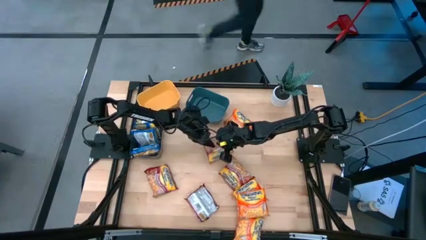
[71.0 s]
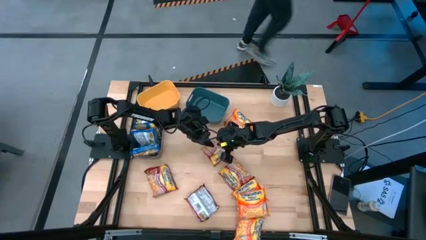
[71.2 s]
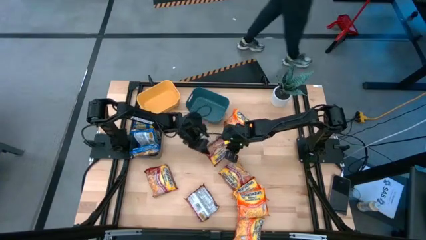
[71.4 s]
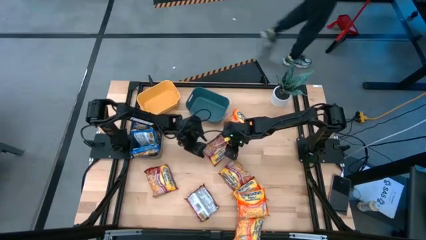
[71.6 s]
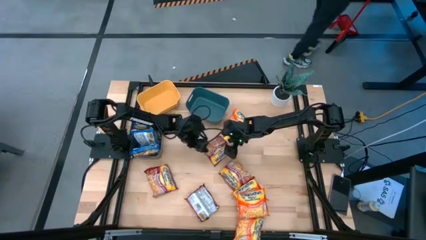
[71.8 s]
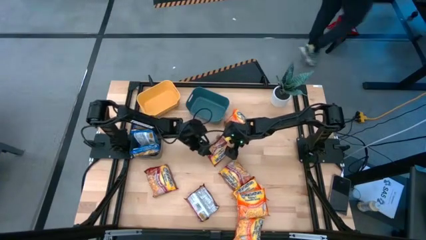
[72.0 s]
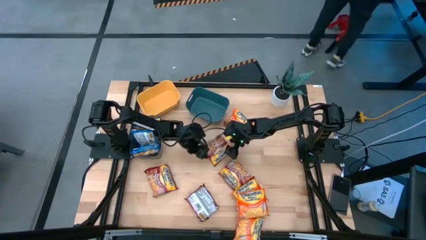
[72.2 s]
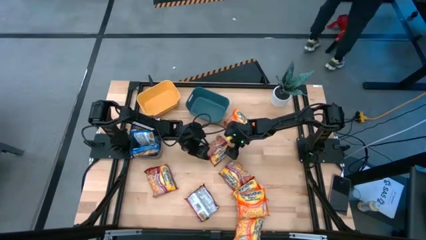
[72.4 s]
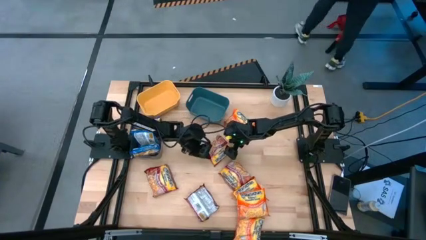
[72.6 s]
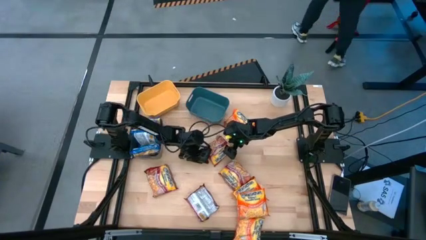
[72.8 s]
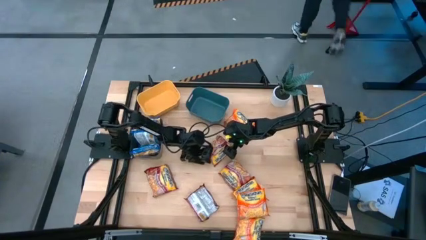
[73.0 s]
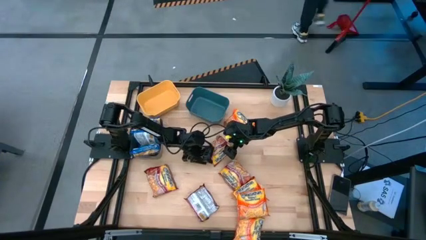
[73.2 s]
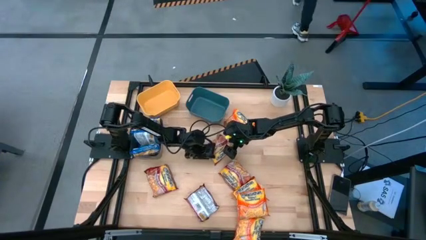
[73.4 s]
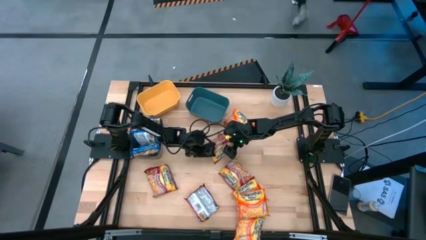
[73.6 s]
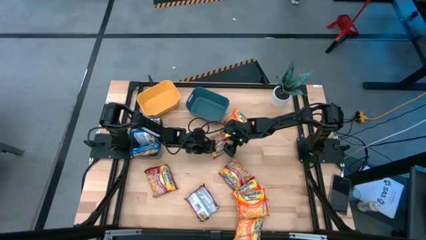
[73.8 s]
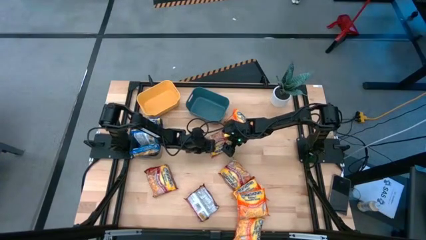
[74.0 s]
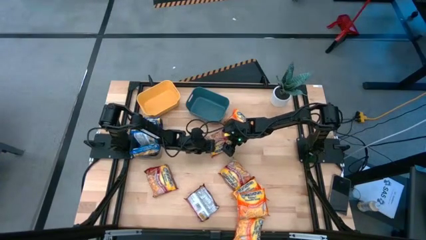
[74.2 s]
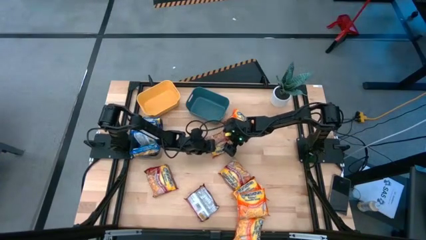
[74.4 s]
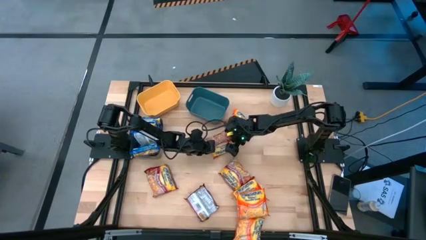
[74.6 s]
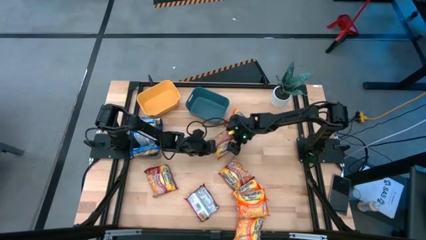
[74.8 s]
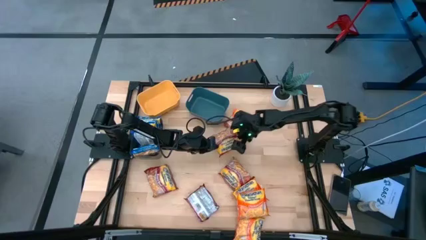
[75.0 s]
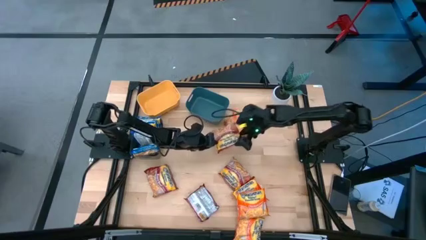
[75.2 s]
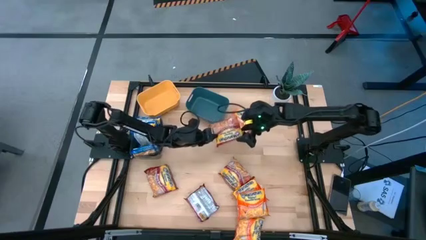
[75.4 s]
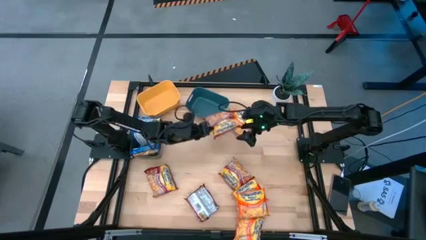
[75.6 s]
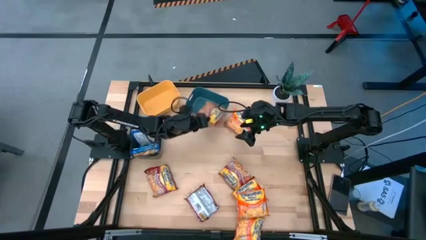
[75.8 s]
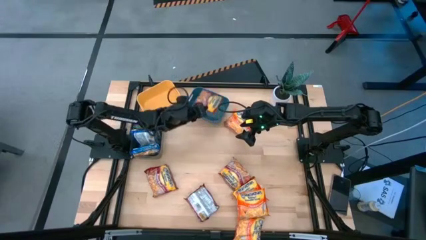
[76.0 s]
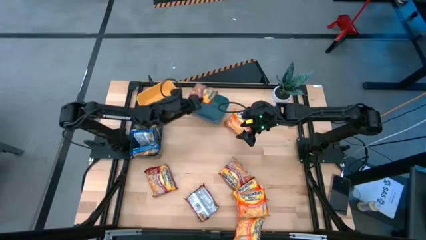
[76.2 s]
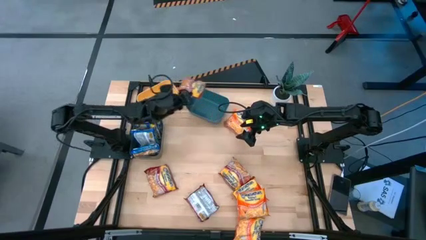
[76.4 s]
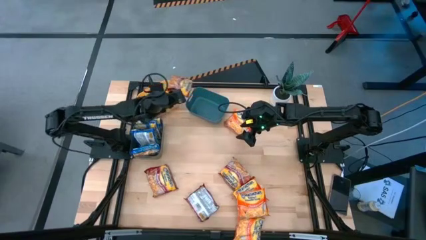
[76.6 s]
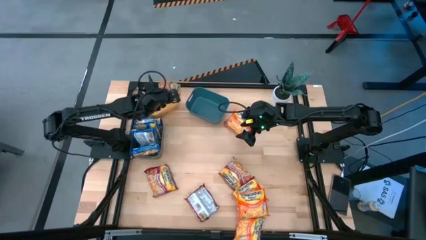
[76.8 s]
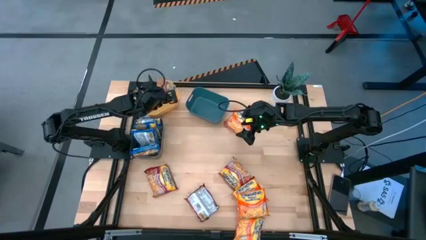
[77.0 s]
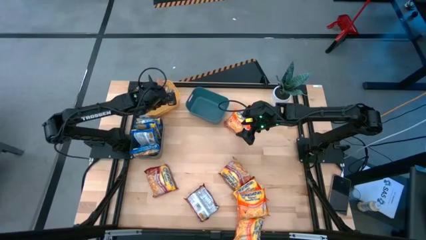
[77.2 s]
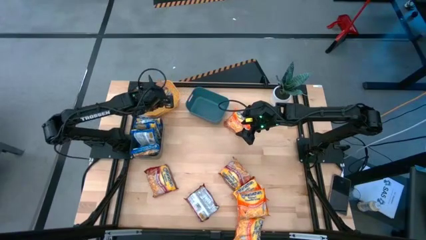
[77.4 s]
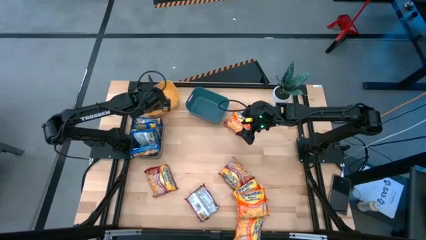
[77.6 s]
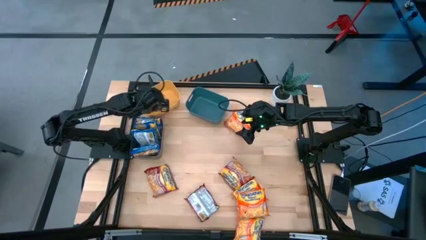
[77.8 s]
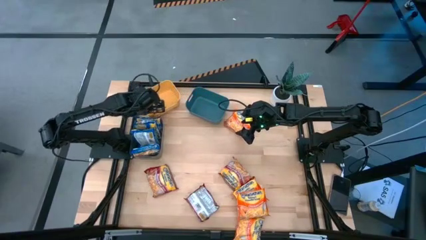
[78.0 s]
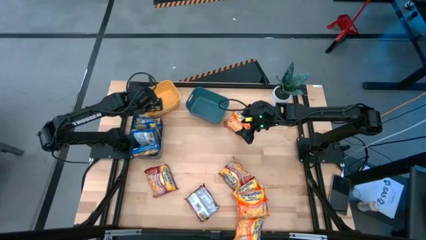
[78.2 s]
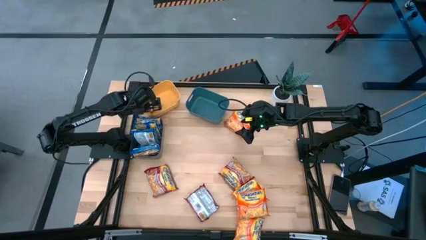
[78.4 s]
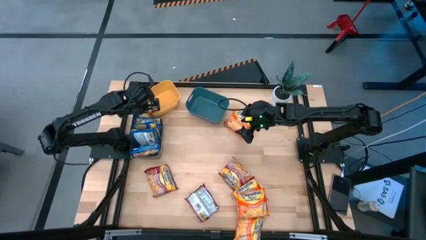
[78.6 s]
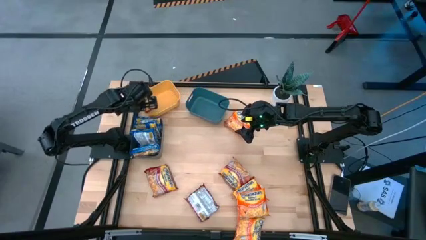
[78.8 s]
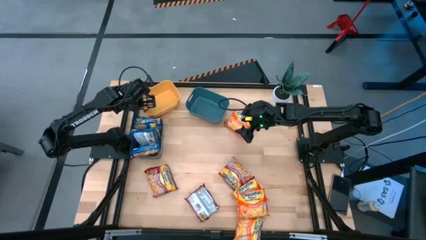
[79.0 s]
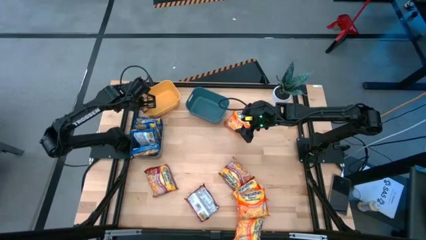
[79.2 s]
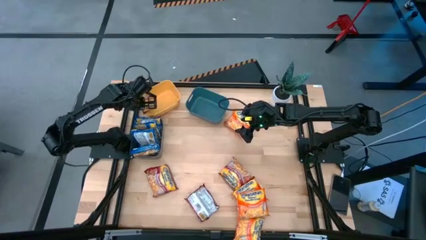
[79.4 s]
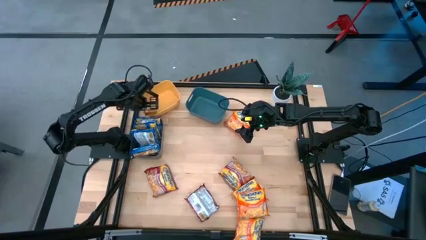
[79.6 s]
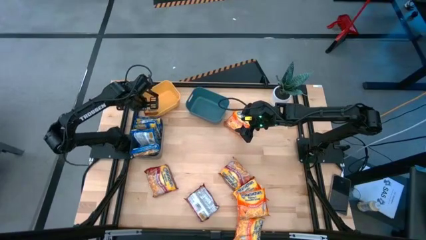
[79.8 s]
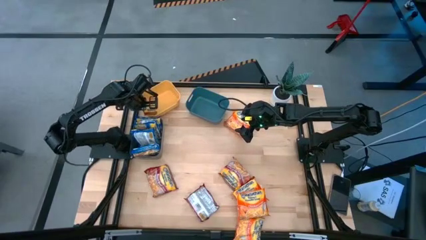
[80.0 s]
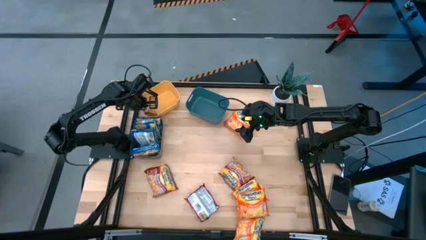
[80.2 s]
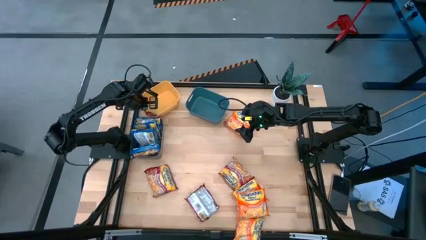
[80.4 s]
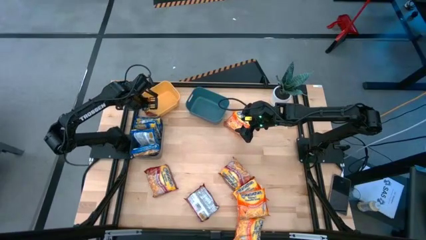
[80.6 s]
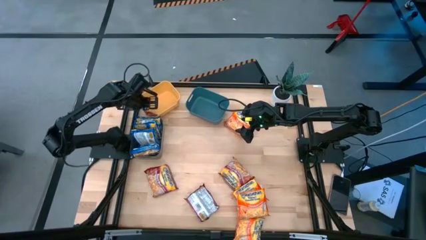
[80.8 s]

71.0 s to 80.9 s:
Task: Sort Maruchan noodles
Put the red noodle pack into the yellow bin
